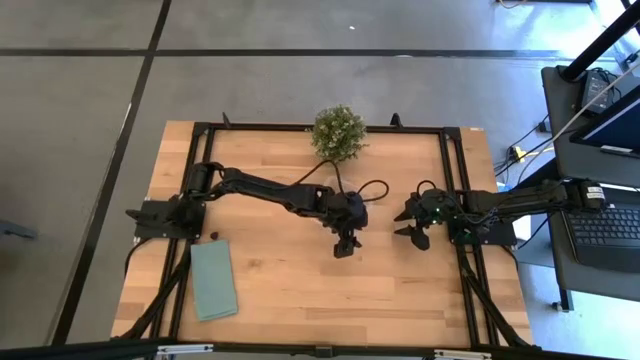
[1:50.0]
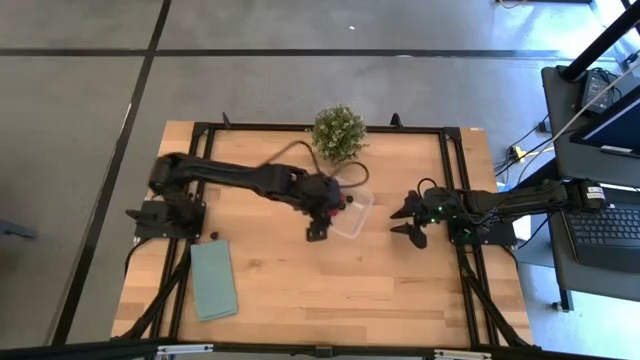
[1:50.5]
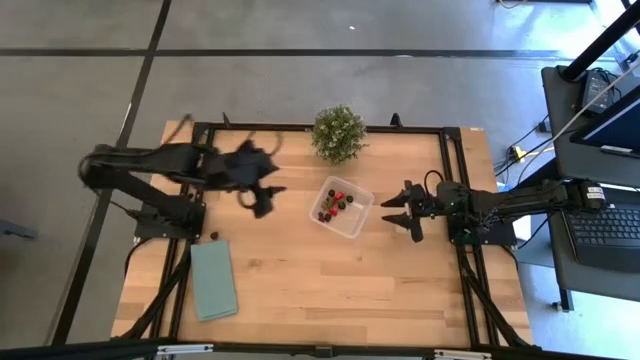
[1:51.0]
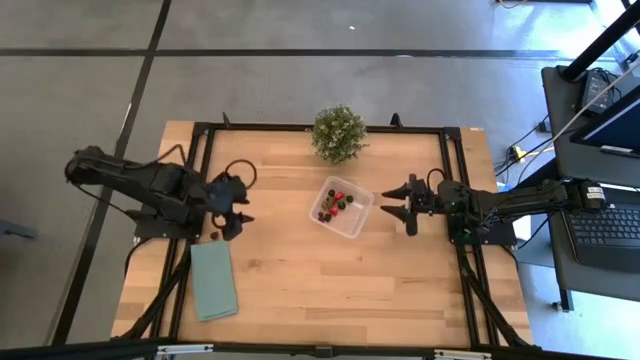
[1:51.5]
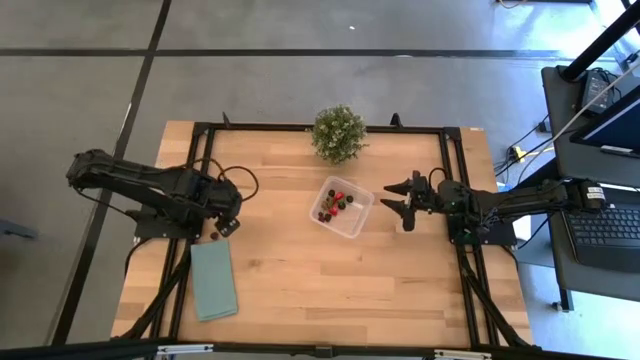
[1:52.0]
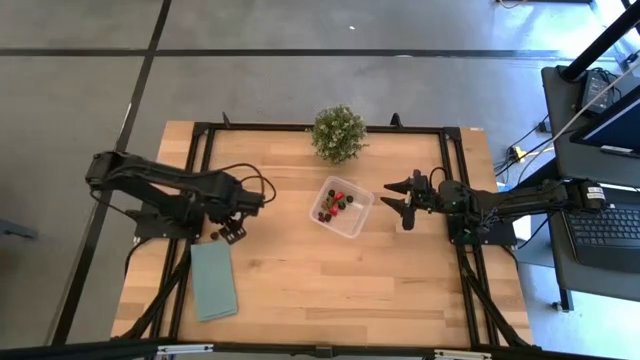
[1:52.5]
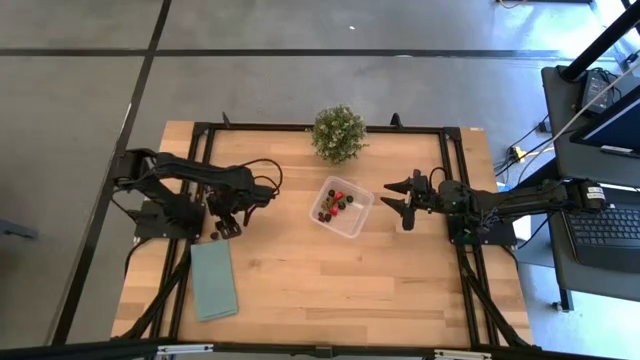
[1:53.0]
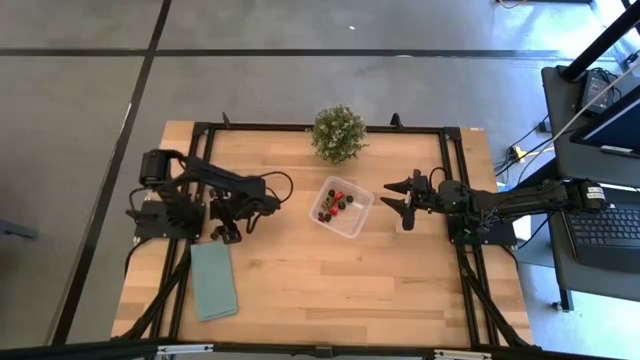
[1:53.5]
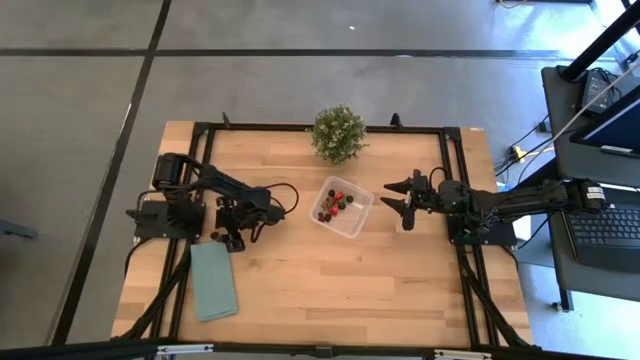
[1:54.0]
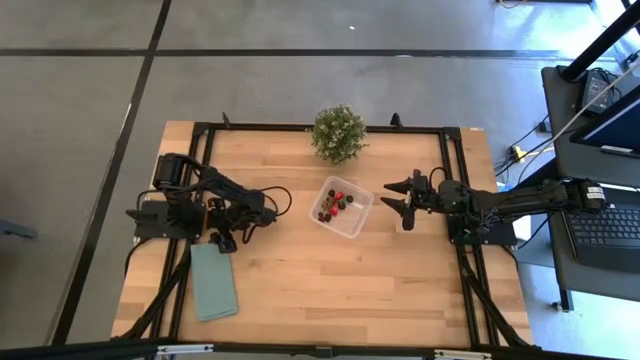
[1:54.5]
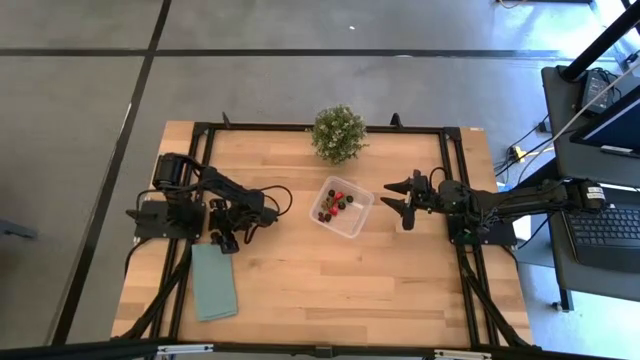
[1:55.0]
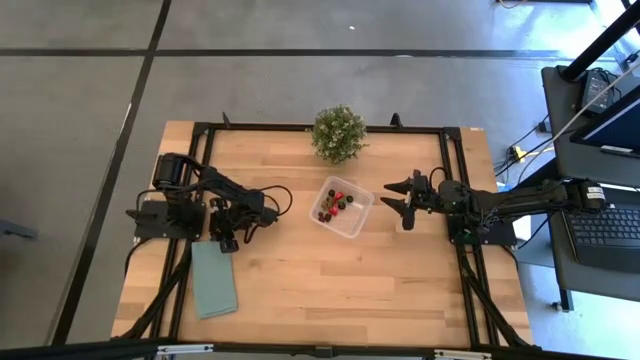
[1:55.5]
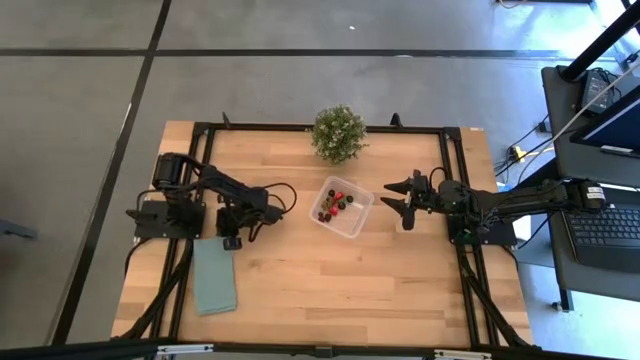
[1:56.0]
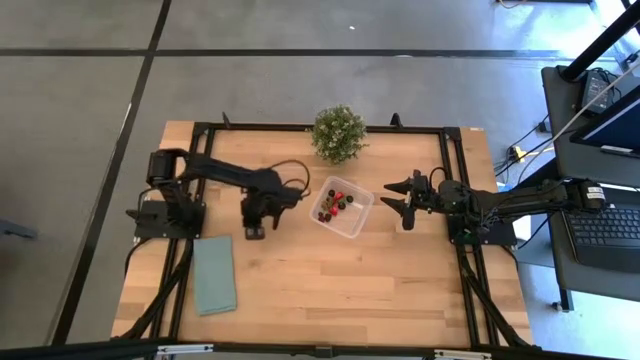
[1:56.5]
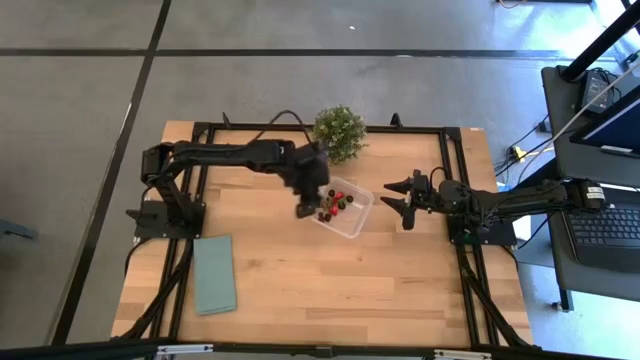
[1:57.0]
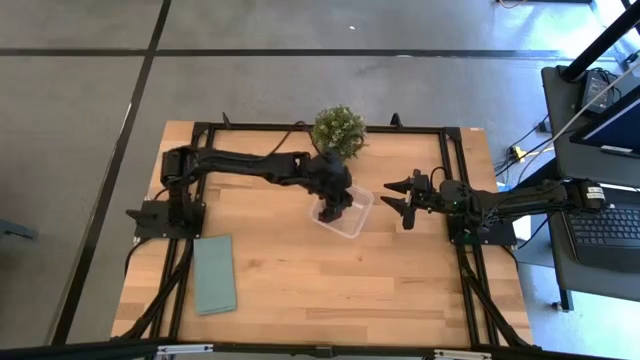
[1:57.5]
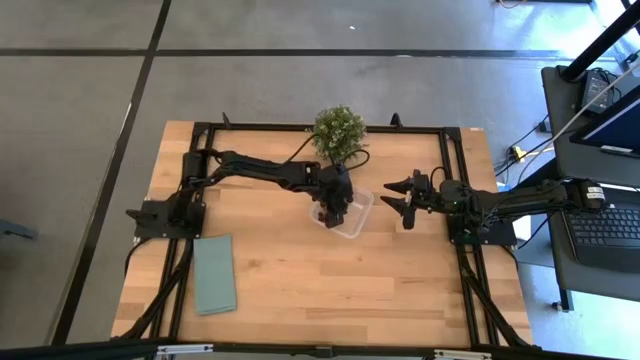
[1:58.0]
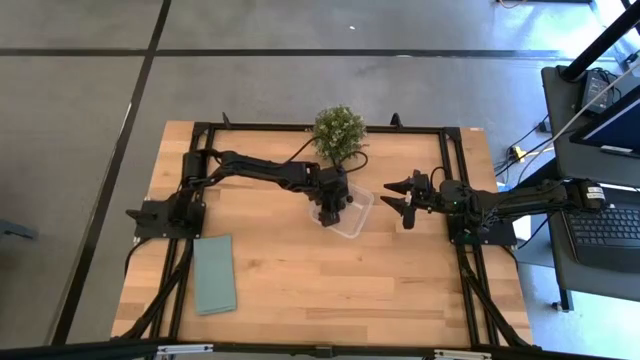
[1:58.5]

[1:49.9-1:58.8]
Task: Pick and placing Produce into tupperware
Put the blackberry into the bin

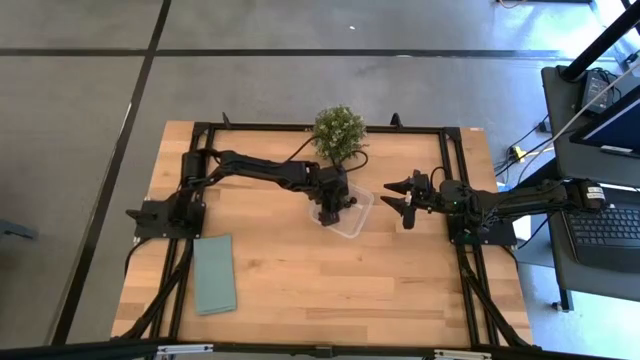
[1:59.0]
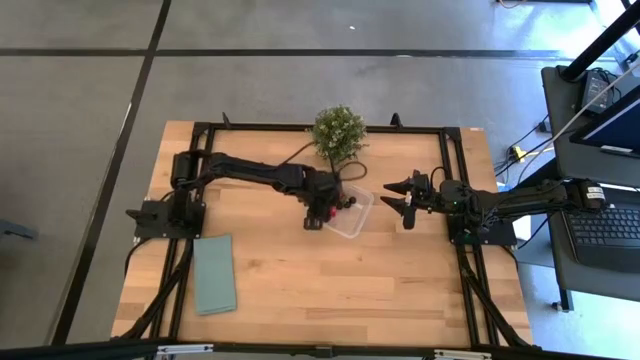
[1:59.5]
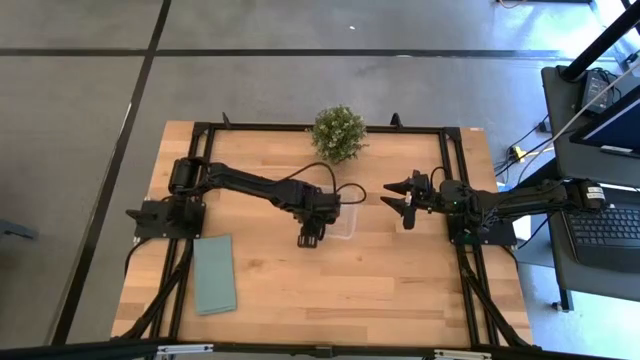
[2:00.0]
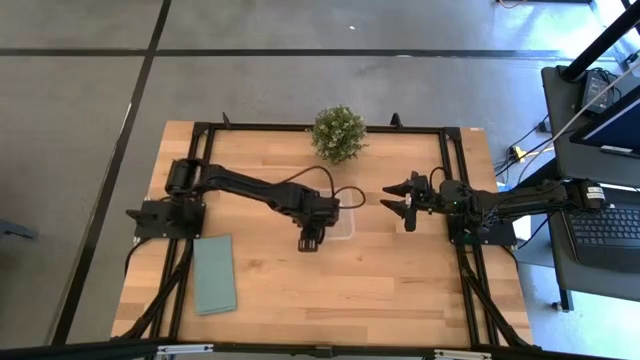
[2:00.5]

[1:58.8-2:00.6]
Adjust the bin on the table

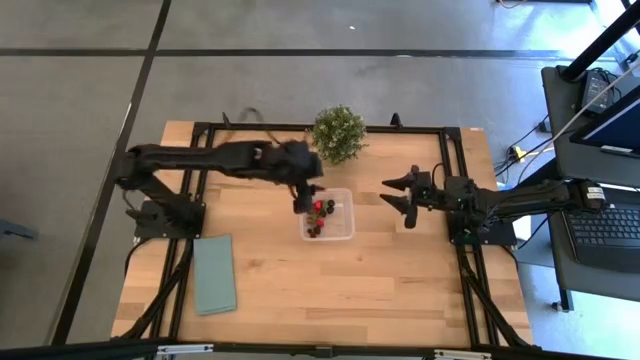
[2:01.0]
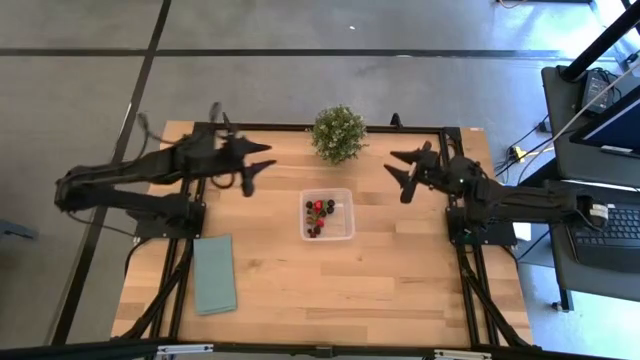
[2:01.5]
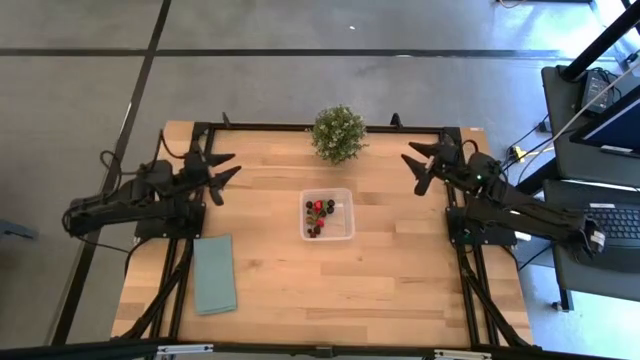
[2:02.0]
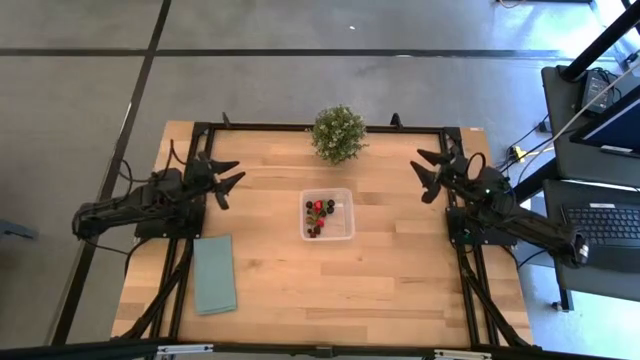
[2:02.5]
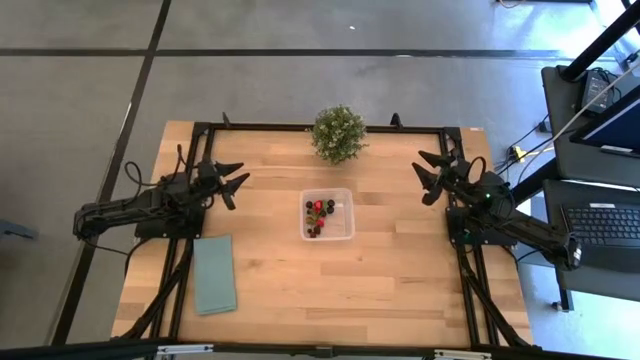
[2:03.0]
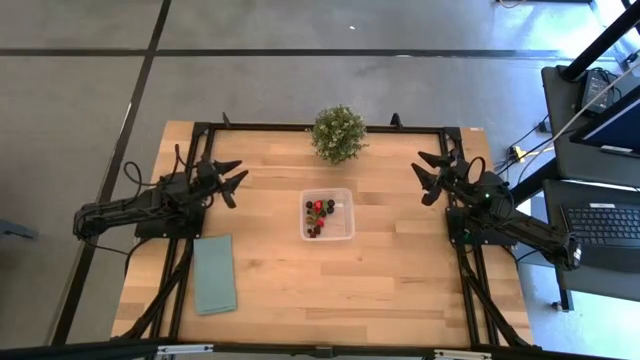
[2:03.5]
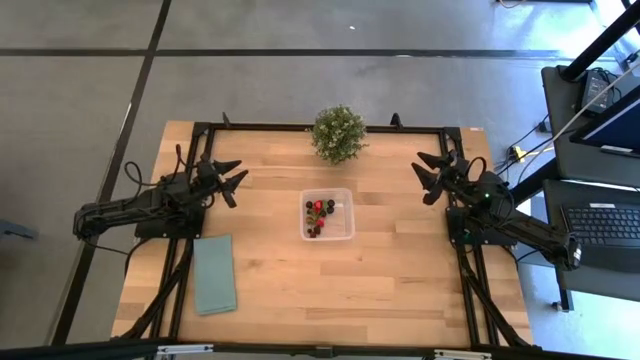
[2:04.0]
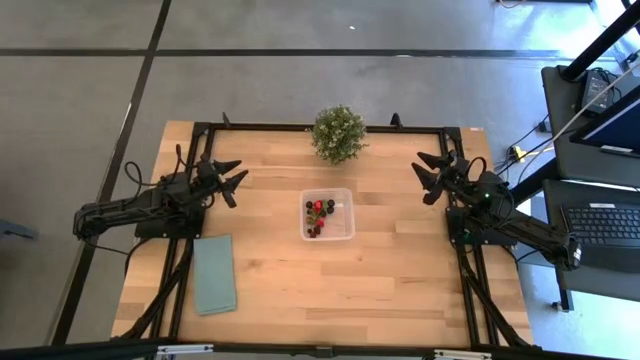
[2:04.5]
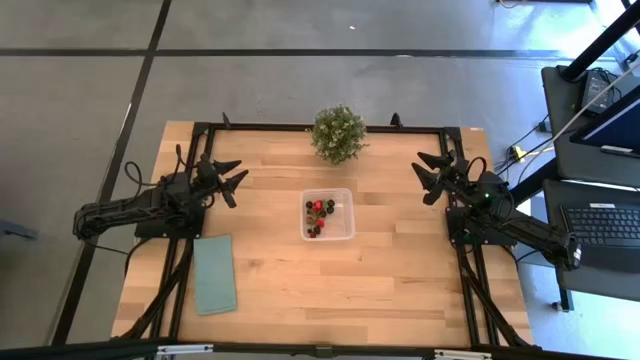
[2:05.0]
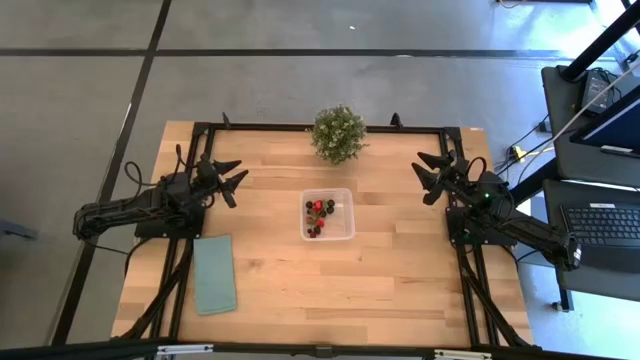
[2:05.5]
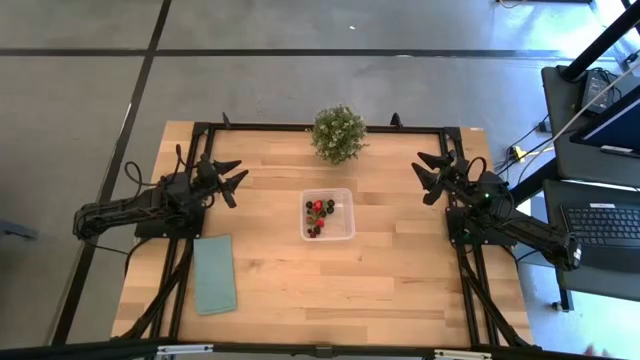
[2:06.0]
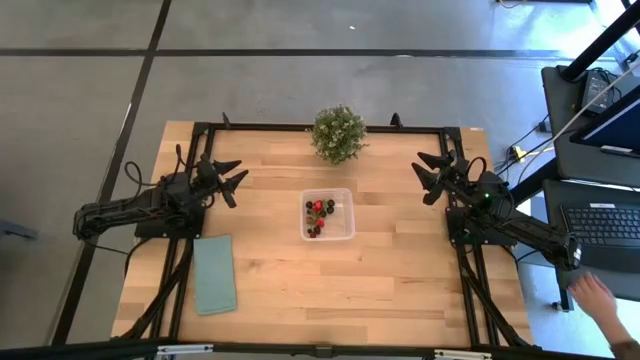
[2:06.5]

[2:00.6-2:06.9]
Return to Home Position

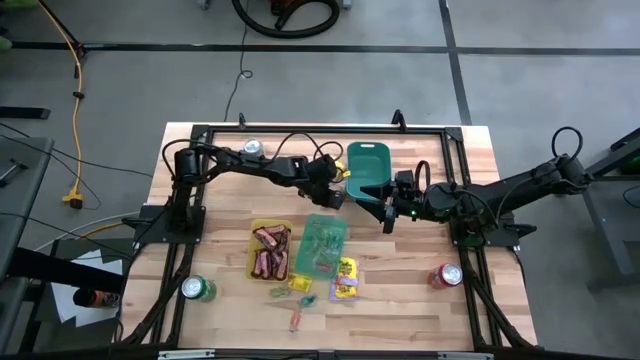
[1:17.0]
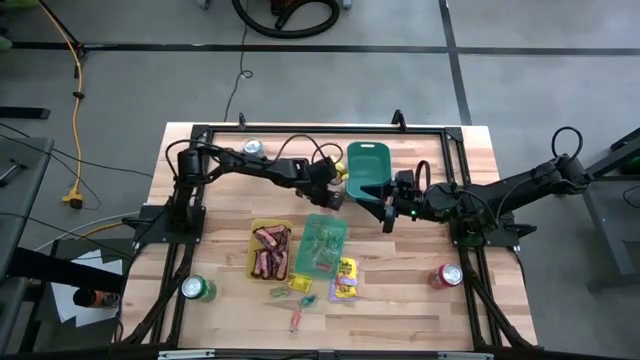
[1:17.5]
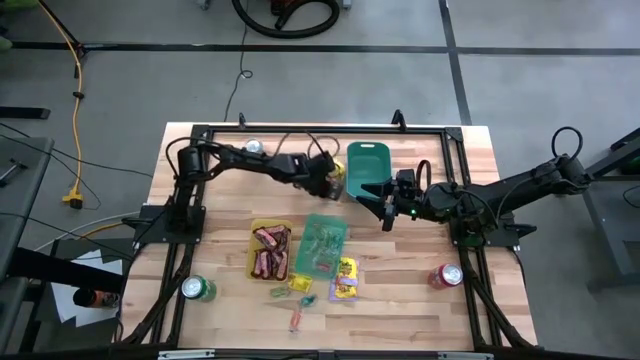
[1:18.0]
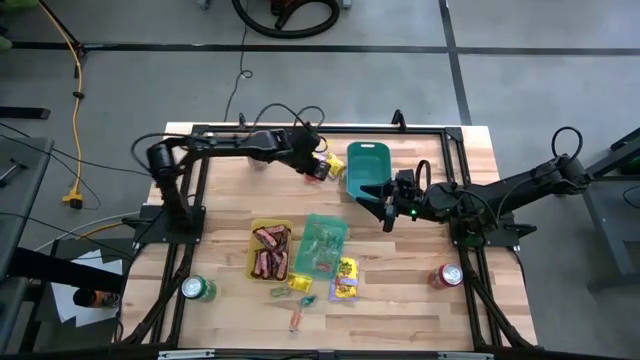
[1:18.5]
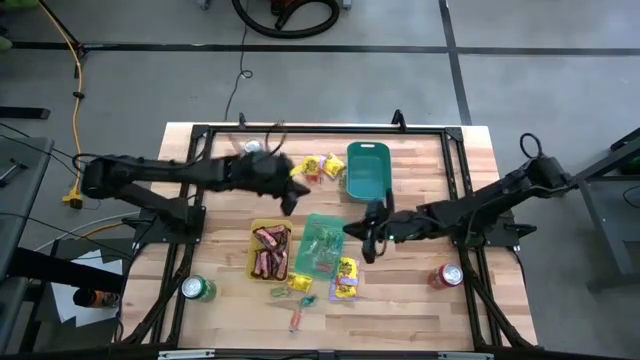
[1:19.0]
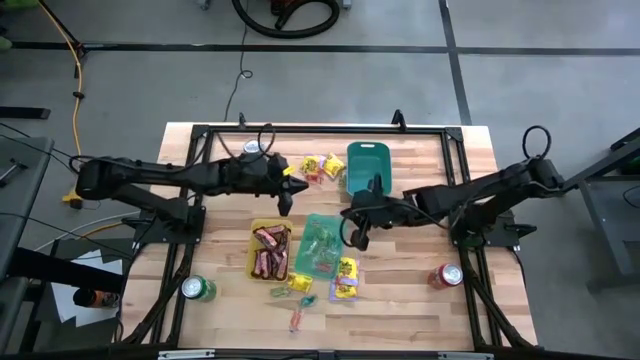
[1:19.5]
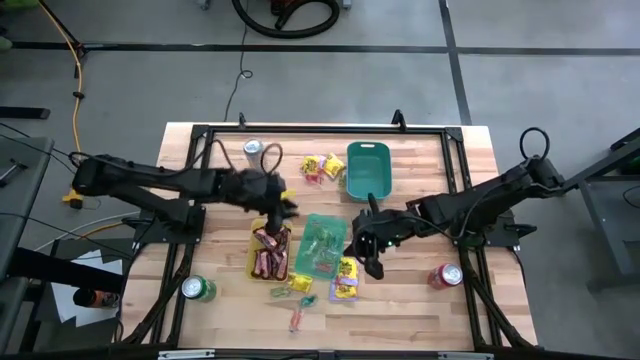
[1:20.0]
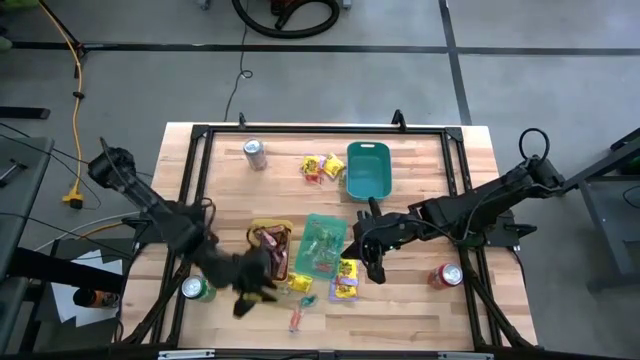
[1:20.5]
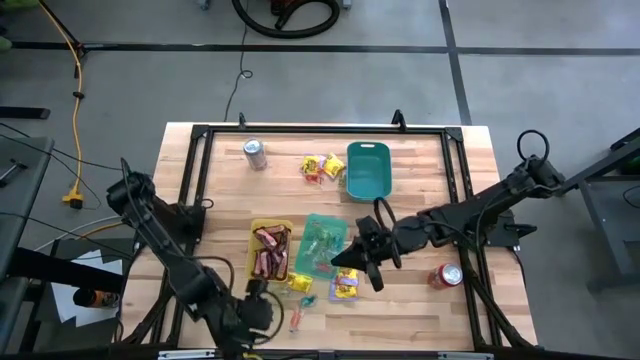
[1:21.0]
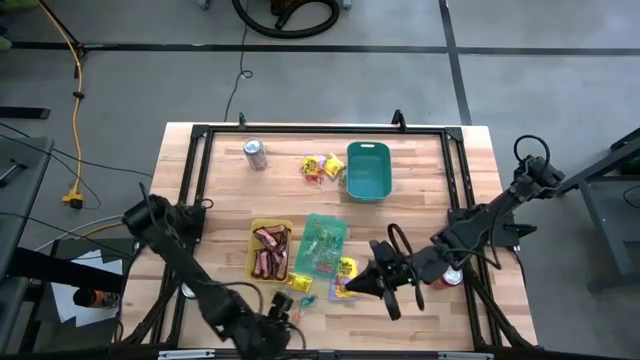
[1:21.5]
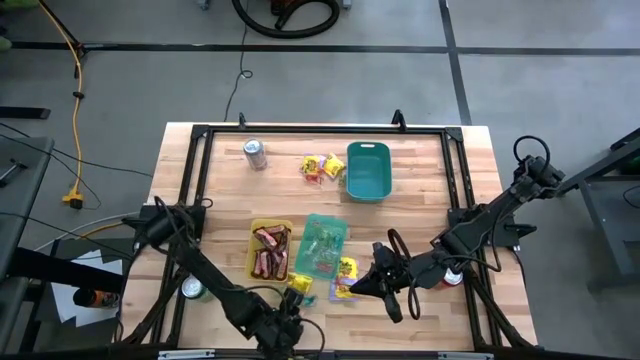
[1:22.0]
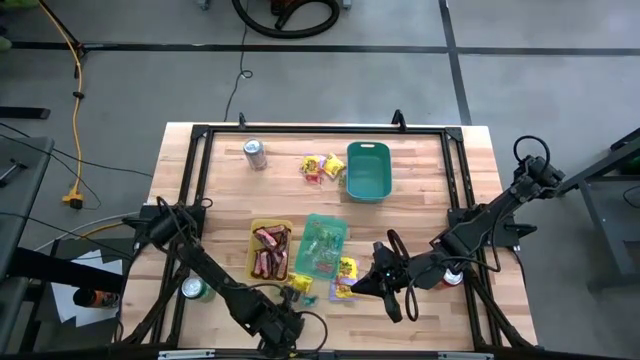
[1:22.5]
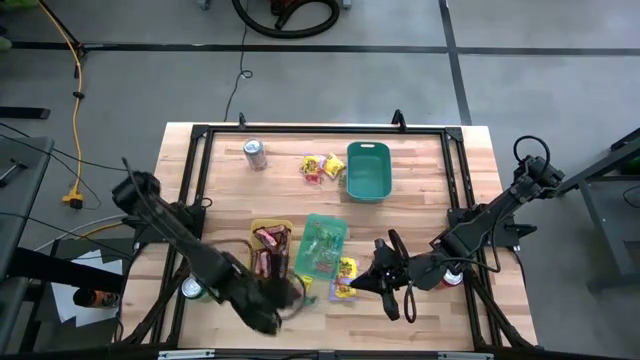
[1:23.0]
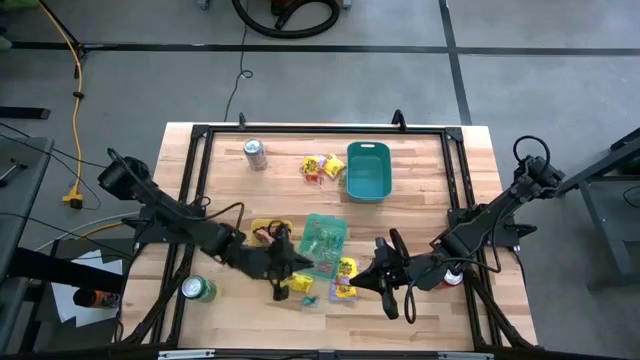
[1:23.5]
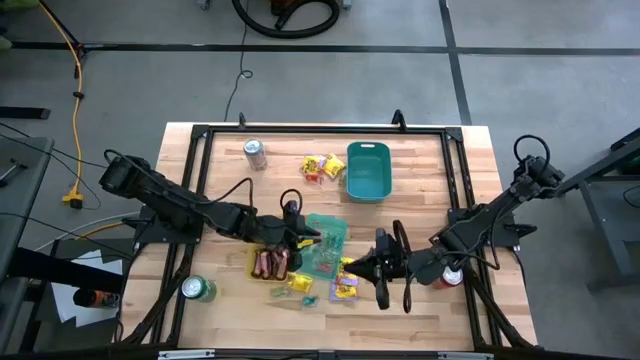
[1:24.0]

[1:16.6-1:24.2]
Task: Sort candy
Put the orange gummy into the light blue bin
